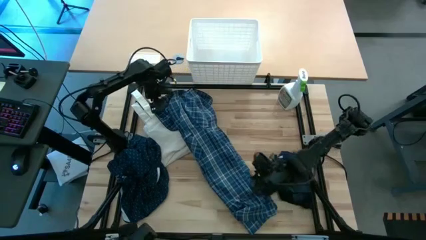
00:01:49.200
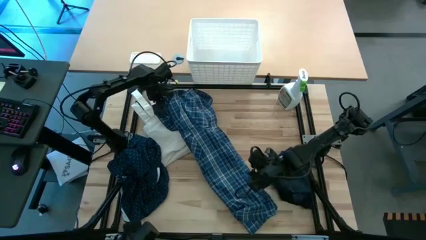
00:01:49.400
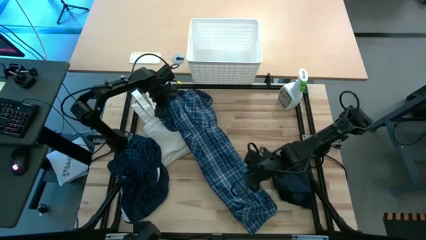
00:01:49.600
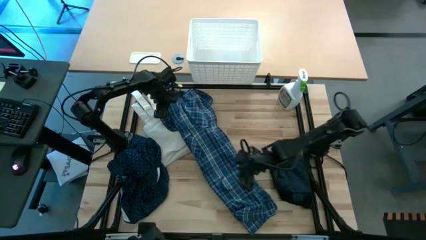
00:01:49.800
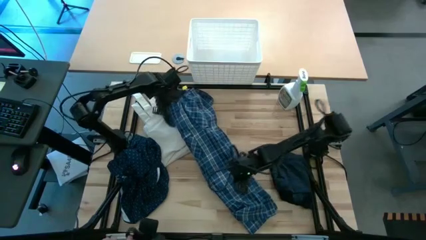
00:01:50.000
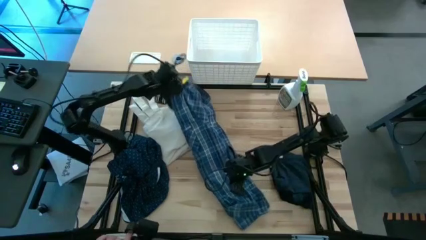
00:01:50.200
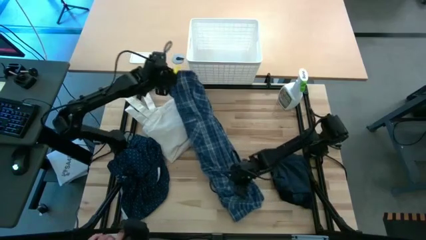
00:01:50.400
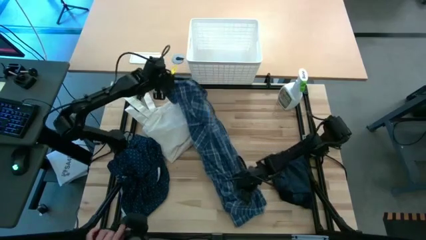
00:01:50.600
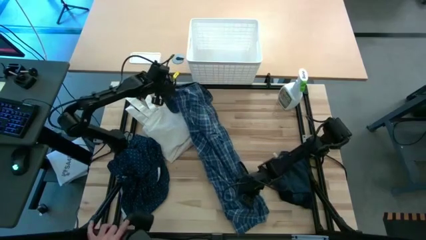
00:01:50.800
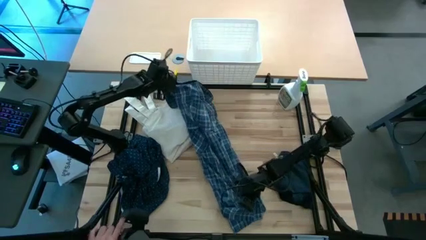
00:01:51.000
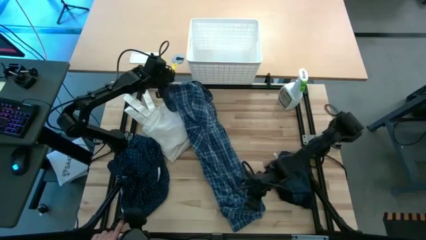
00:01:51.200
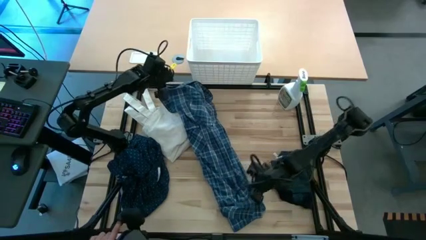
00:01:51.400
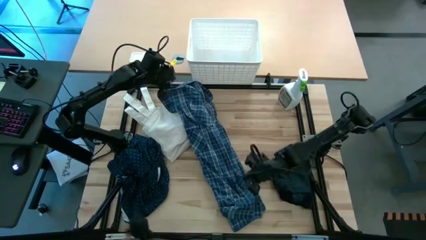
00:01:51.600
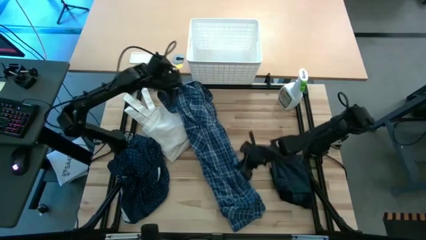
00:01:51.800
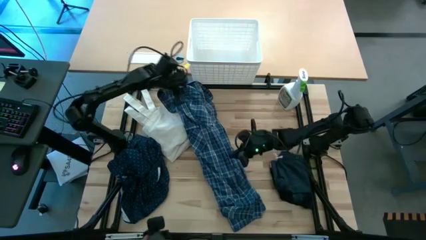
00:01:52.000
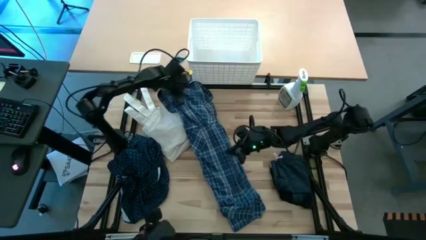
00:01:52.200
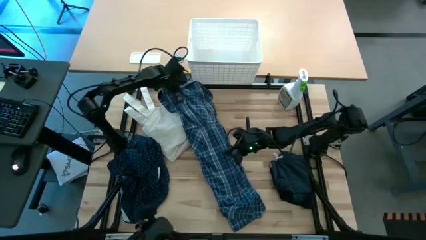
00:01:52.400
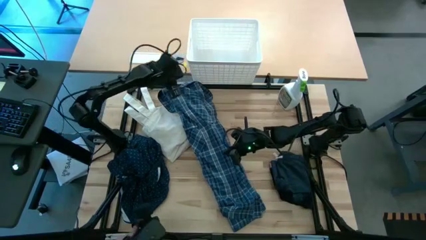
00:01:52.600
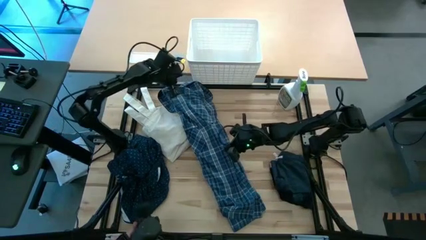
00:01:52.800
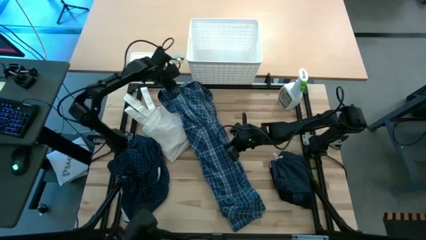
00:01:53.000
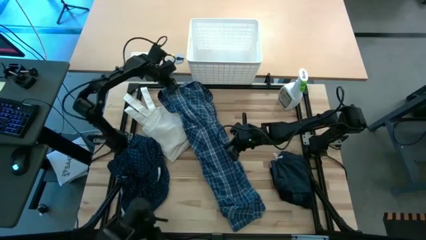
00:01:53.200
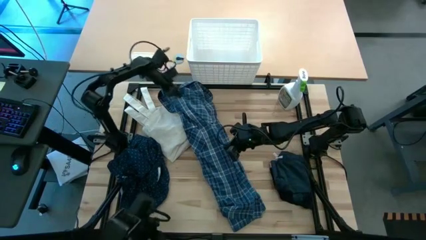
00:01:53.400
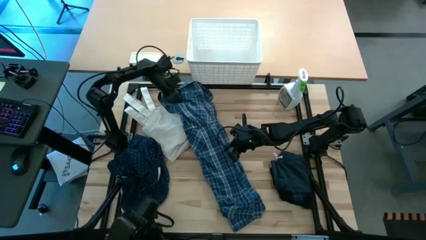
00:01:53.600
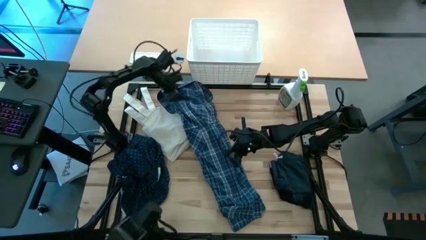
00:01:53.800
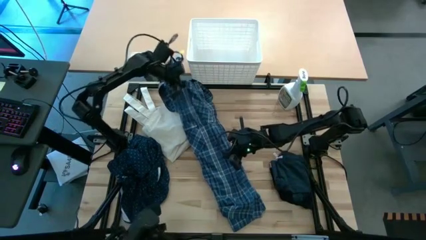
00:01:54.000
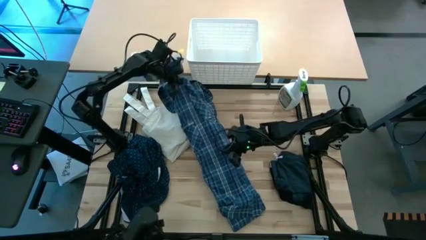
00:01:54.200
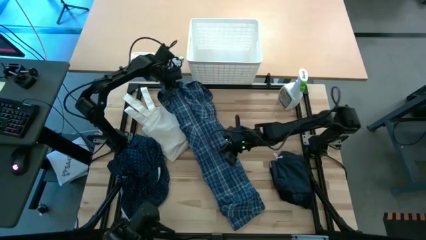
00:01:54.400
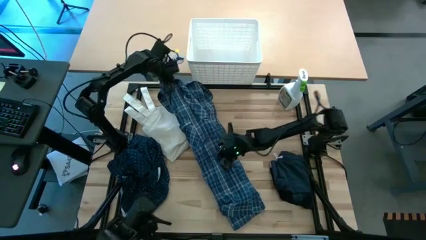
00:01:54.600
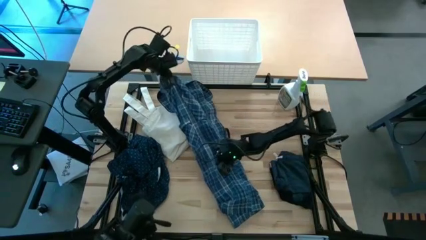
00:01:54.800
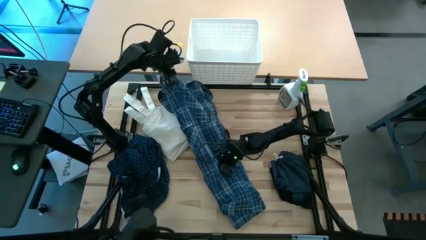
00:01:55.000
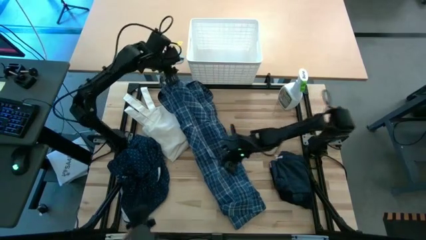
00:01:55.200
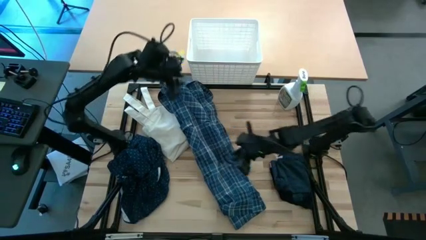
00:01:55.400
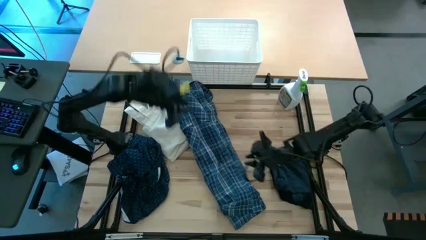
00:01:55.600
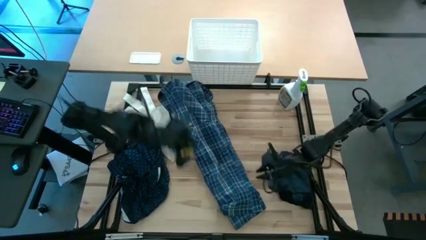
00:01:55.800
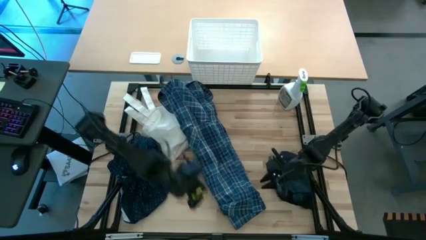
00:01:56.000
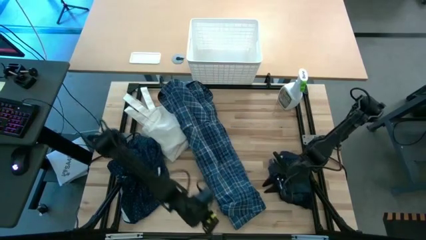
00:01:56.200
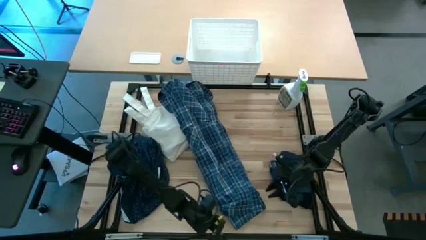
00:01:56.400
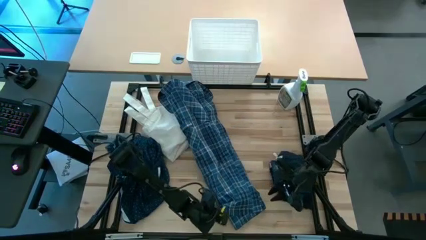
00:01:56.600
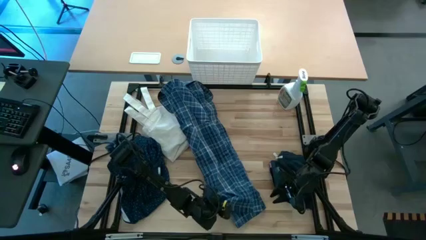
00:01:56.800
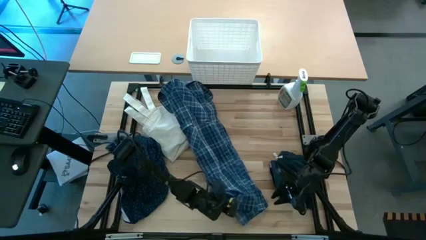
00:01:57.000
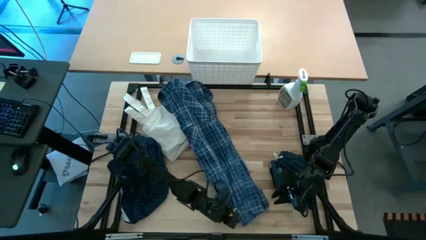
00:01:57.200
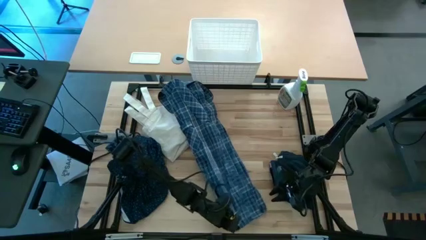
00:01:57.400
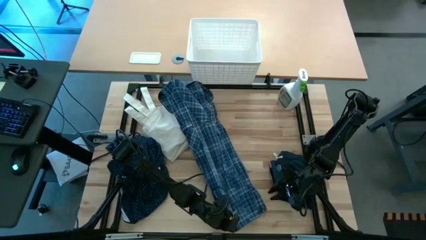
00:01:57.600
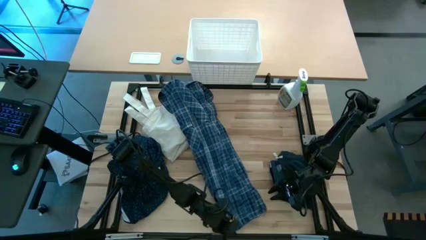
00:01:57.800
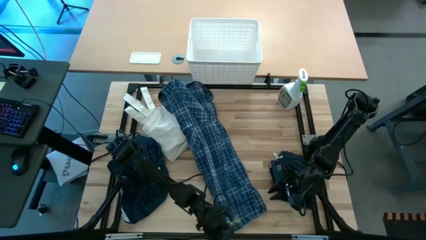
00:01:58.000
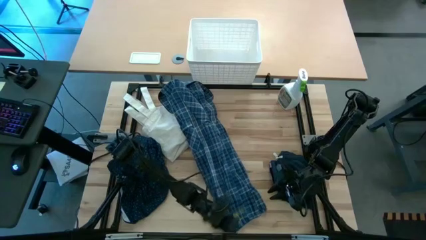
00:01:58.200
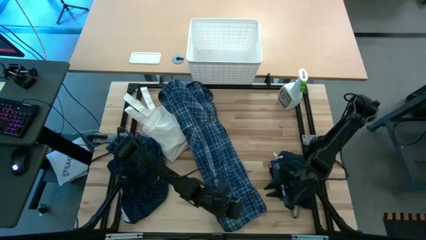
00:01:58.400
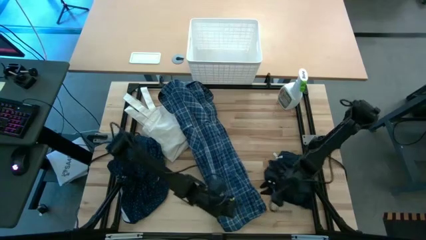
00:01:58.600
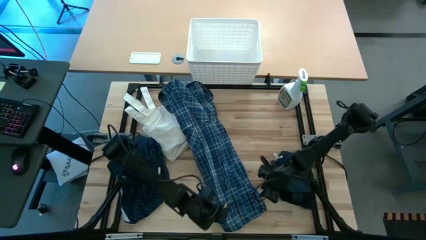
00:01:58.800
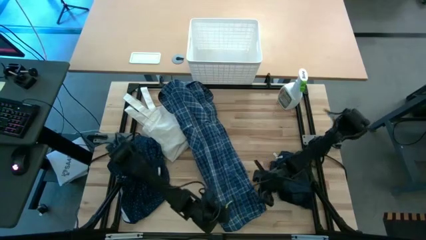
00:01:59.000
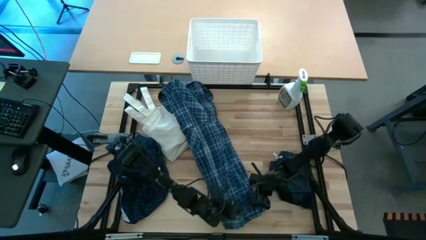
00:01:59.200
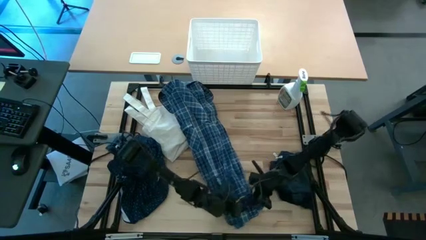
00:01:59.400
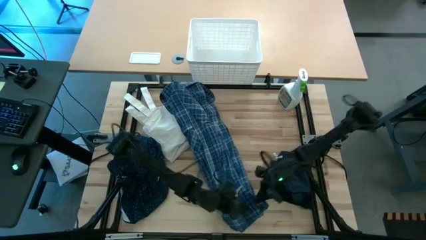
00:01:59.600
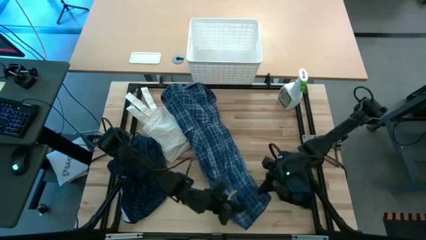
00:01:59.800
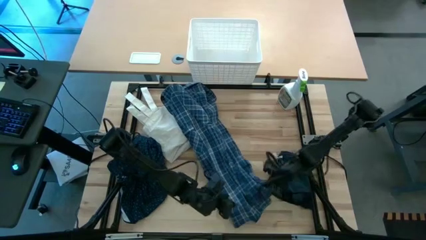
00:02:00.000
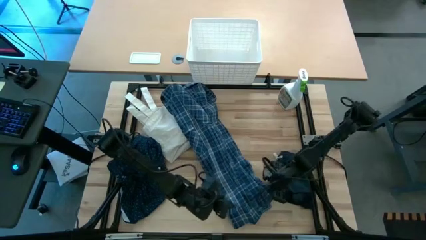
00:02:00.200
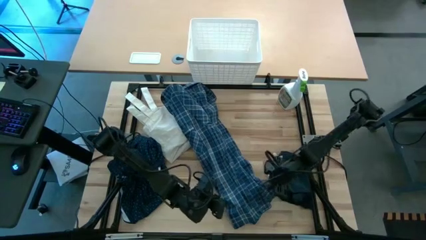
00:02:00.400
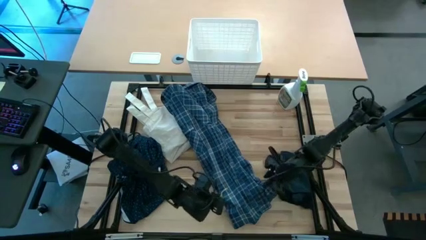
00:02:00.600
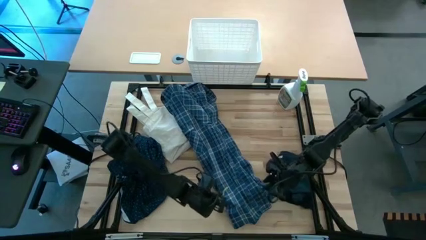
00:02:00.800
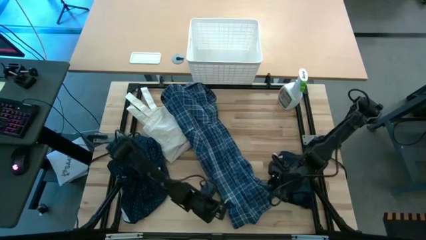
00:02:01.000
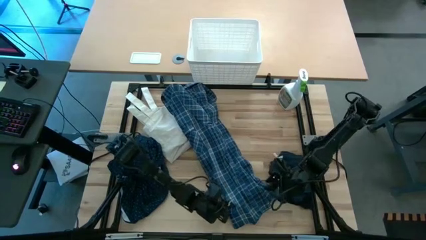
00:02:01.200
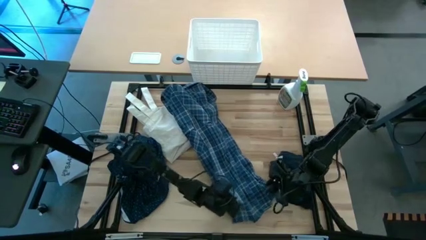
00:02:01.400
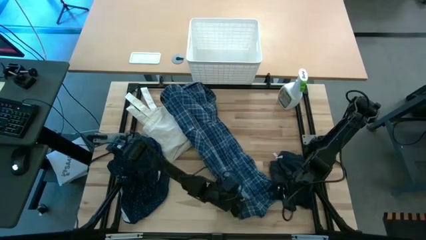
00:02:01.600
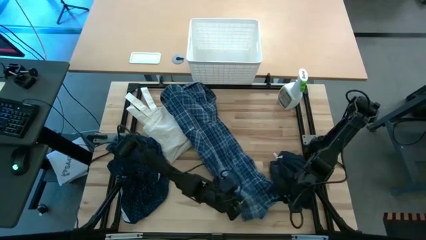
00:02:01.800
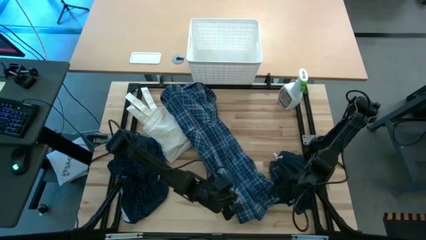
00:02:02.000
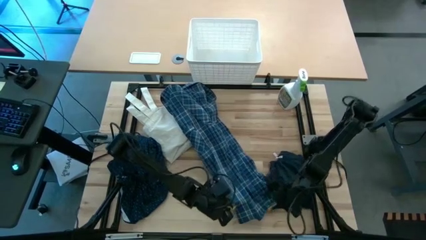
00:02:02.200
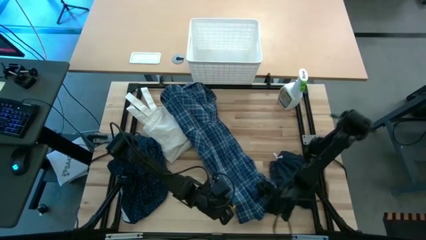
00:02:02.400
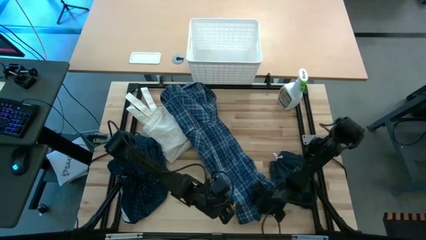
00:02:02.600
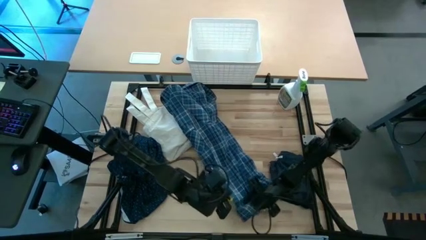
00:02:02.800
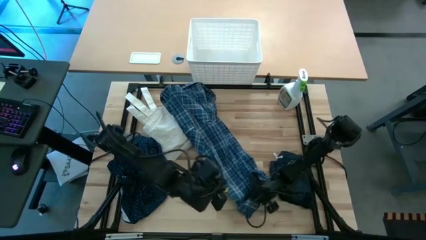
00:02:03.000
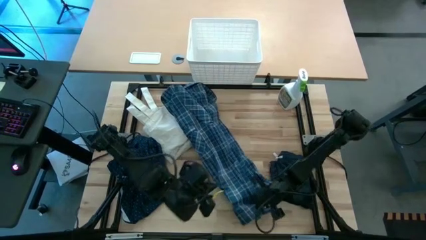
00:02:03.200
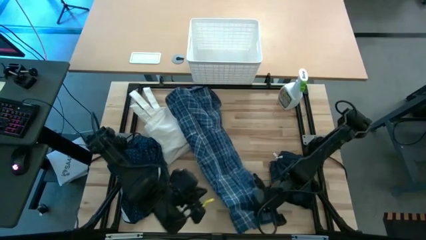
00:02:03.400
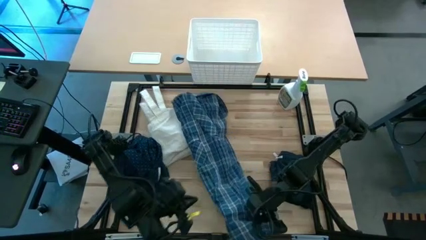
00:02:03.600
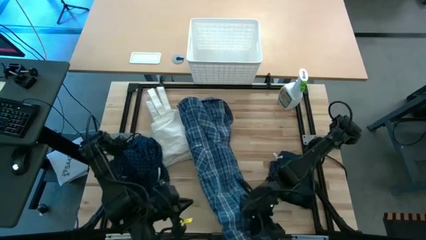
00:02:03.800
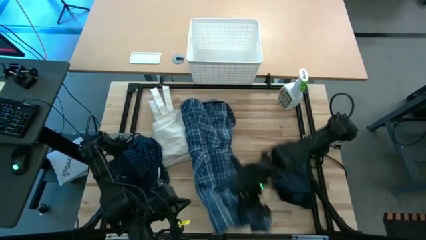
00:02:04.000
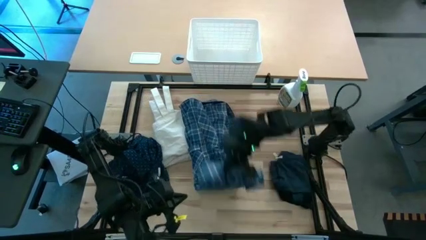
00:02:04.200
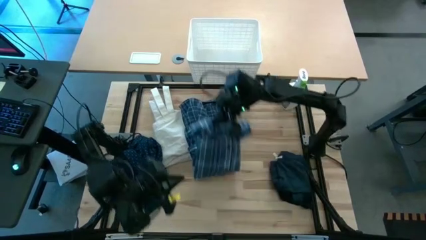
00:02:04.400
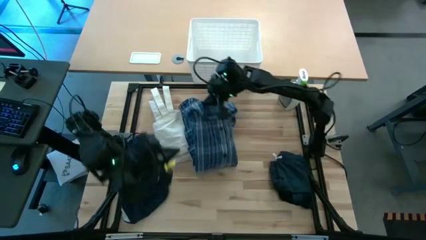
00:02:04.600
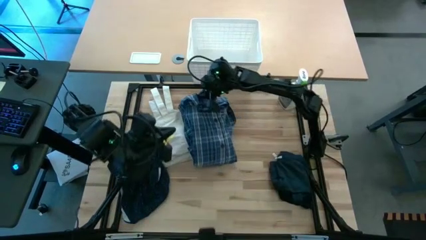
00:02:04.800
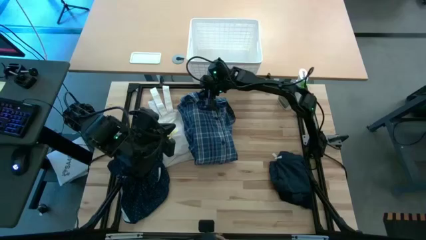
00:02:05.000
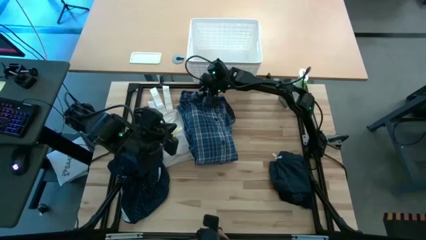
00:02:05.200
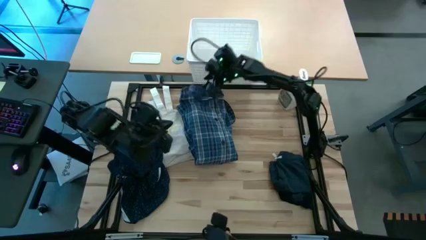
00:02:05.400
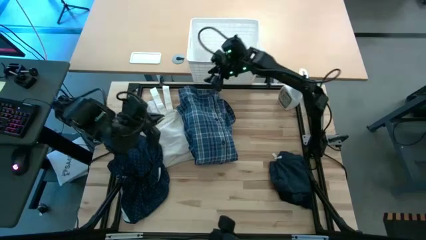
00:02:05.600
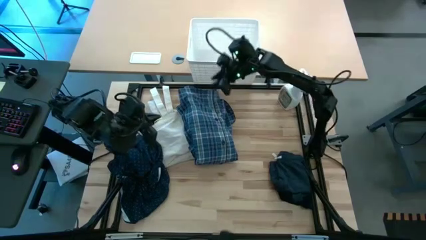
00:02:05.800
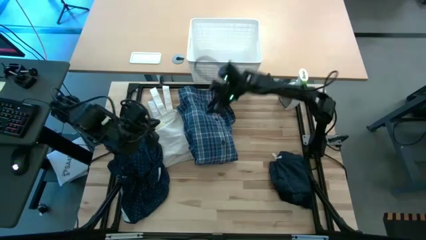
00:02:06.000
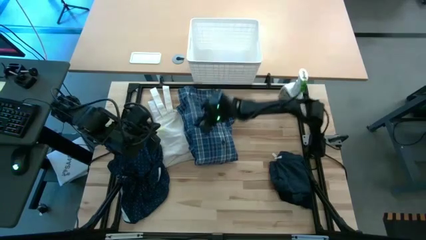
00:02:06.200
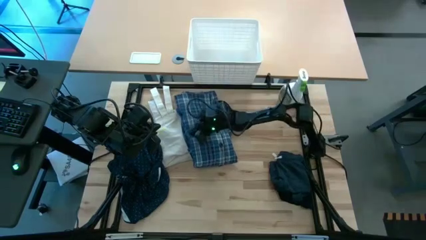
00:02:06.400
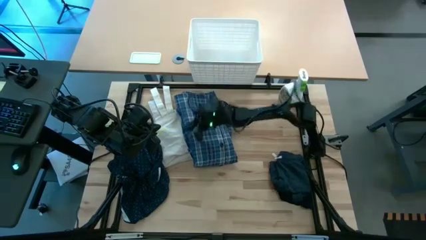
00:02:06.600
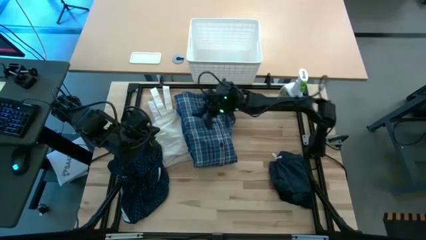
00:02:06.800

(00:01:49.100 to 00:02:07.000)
Fold the blue checkered long sleeve
